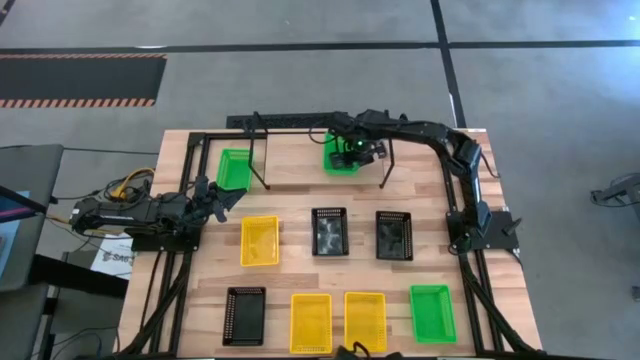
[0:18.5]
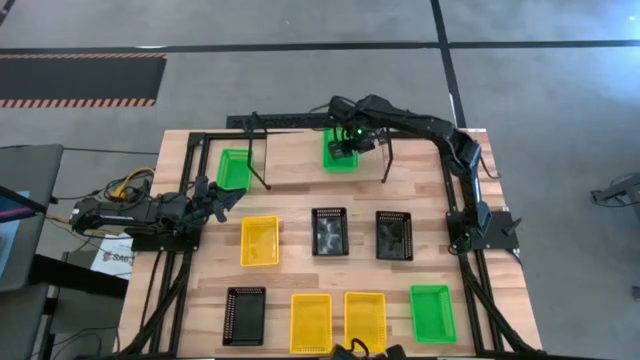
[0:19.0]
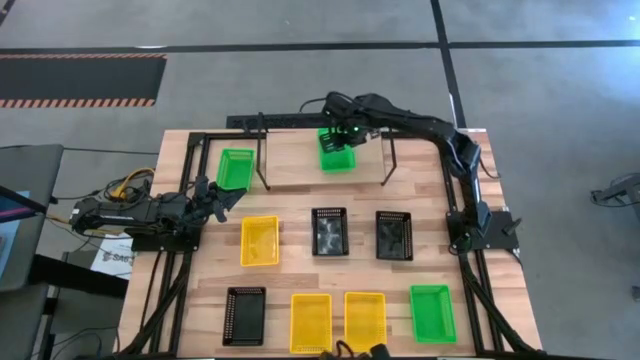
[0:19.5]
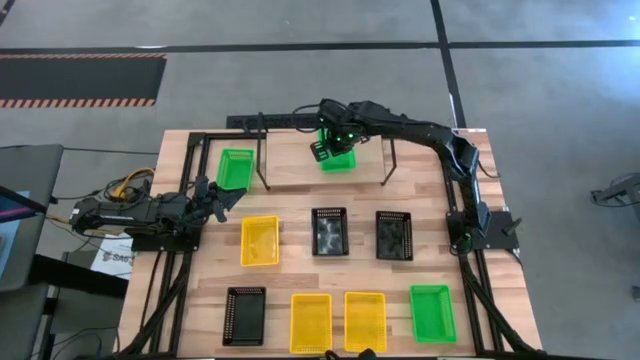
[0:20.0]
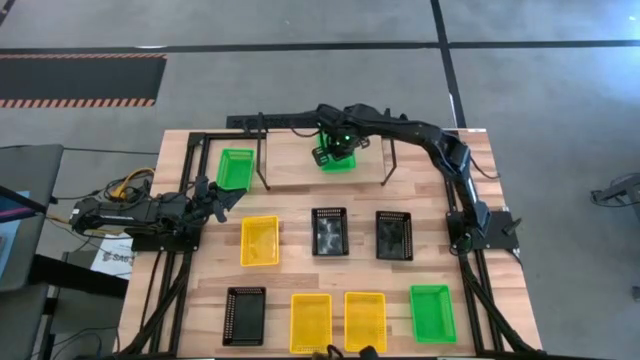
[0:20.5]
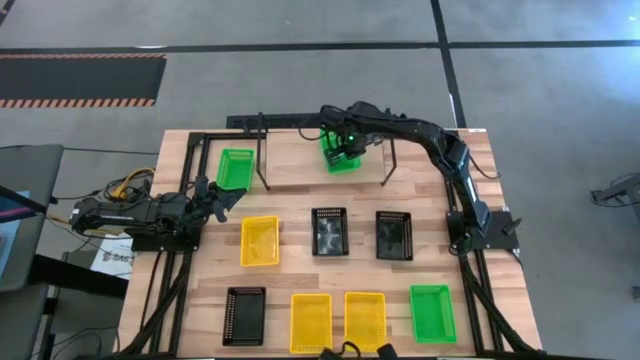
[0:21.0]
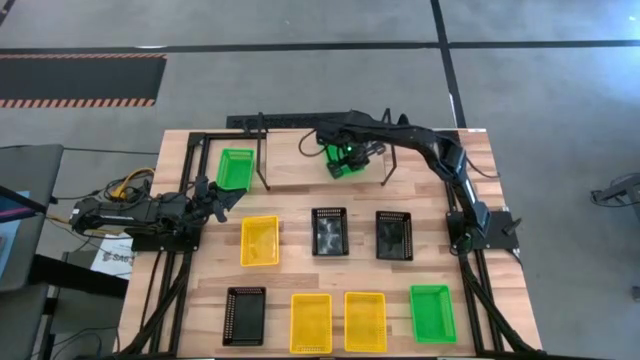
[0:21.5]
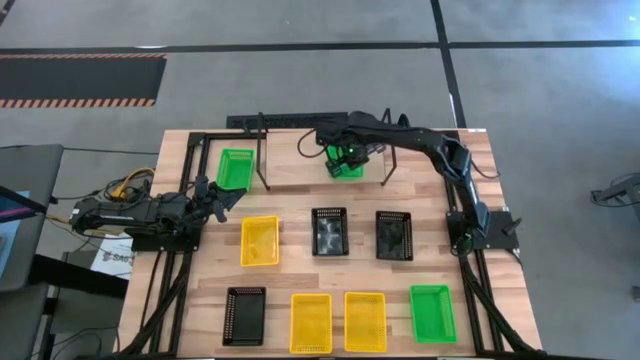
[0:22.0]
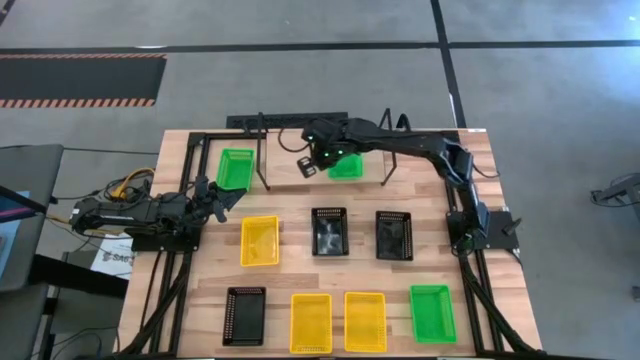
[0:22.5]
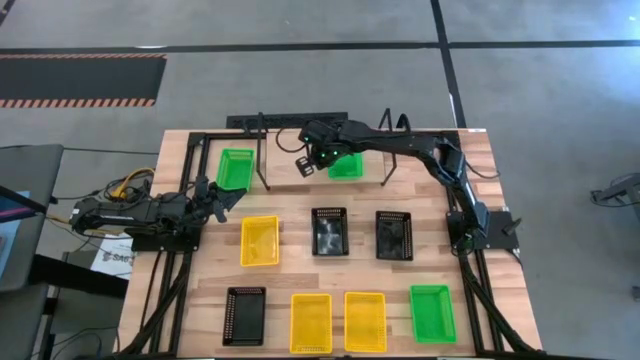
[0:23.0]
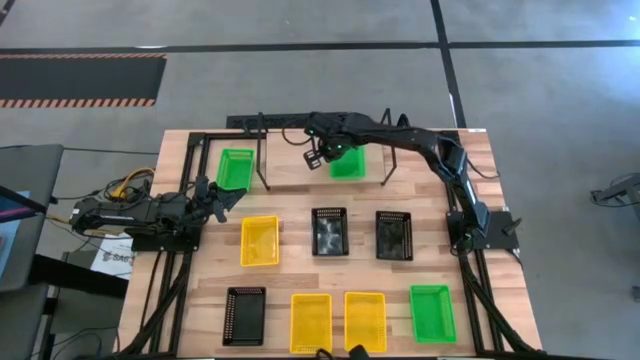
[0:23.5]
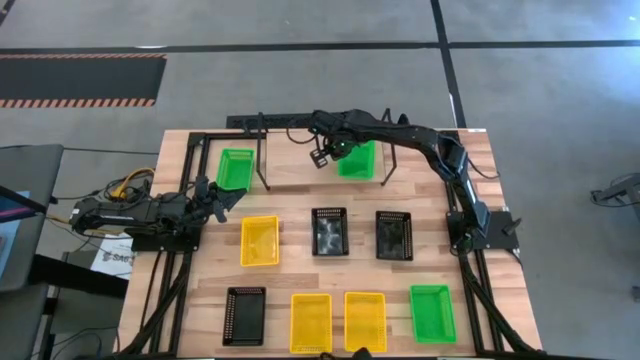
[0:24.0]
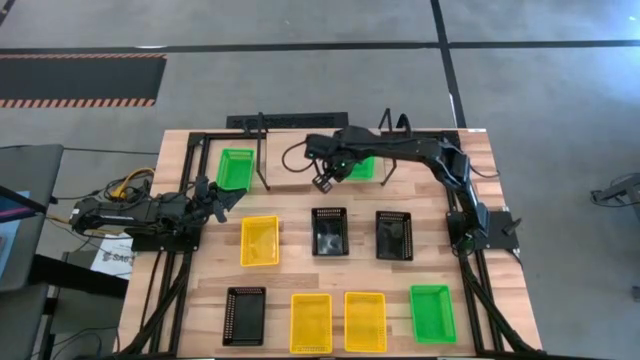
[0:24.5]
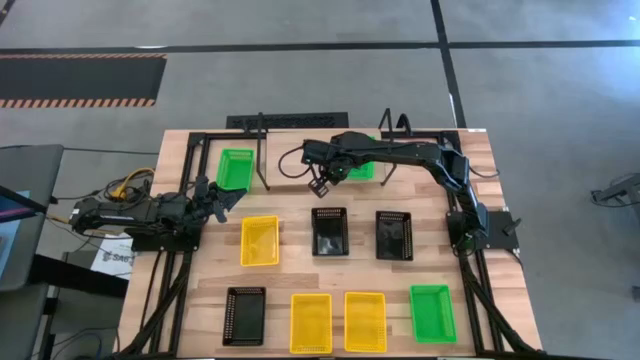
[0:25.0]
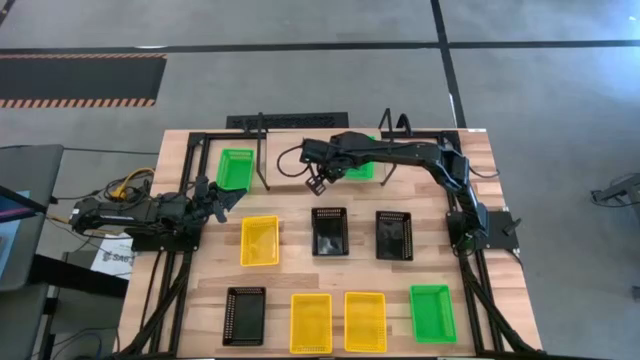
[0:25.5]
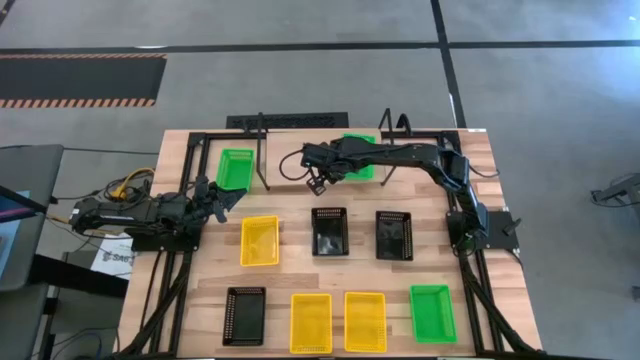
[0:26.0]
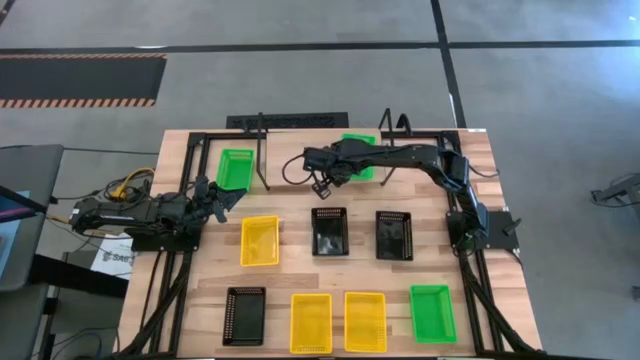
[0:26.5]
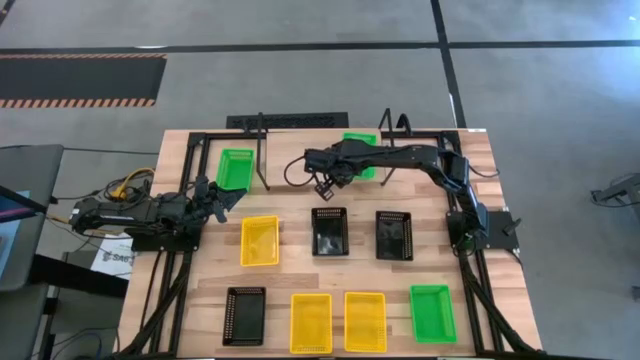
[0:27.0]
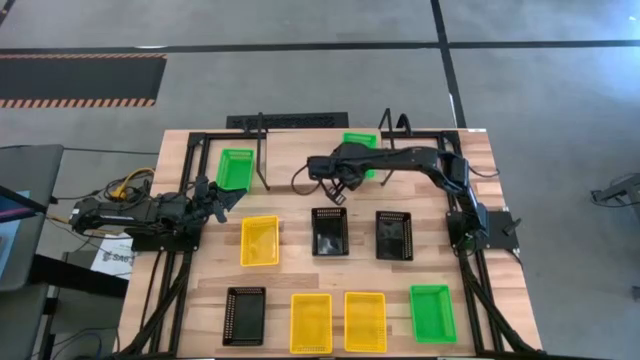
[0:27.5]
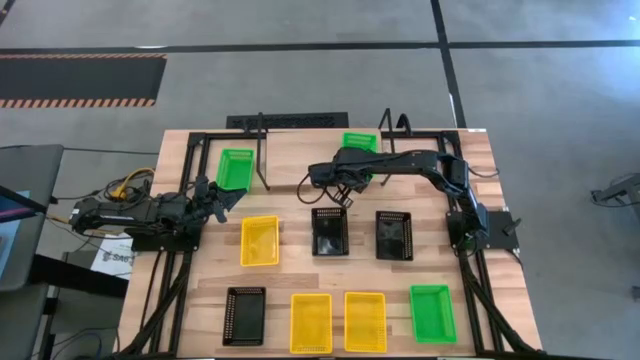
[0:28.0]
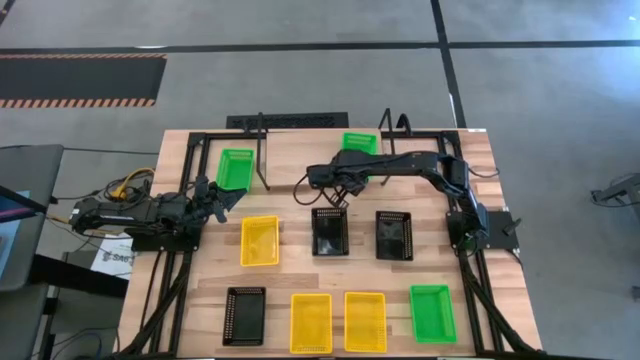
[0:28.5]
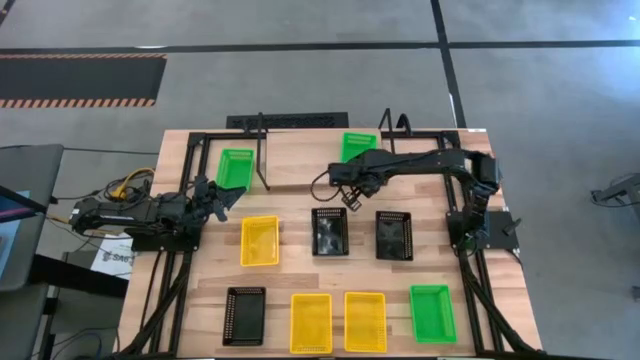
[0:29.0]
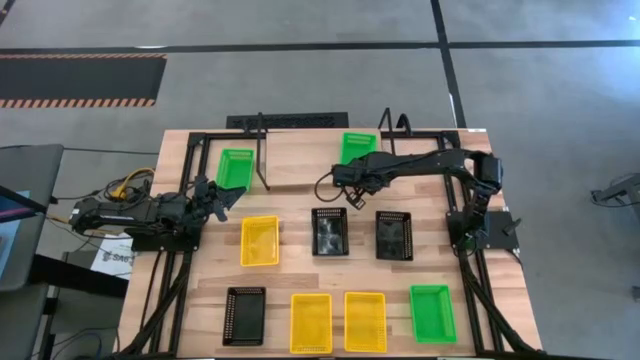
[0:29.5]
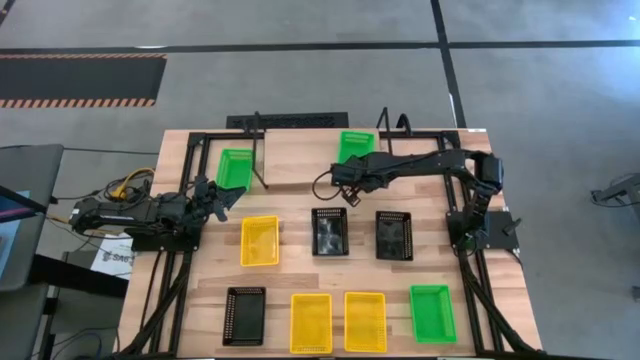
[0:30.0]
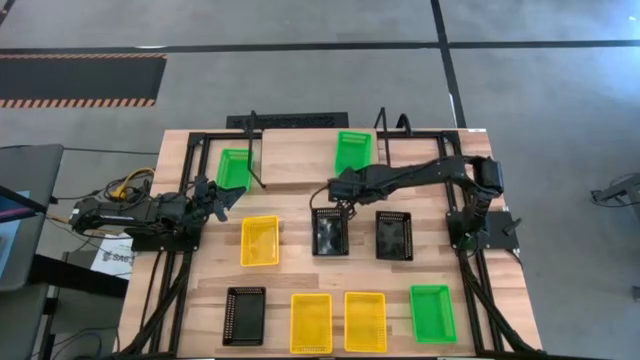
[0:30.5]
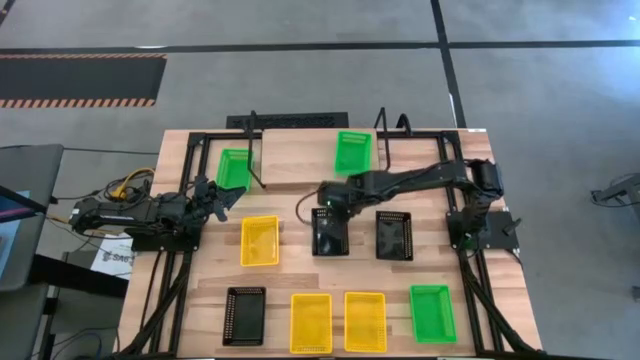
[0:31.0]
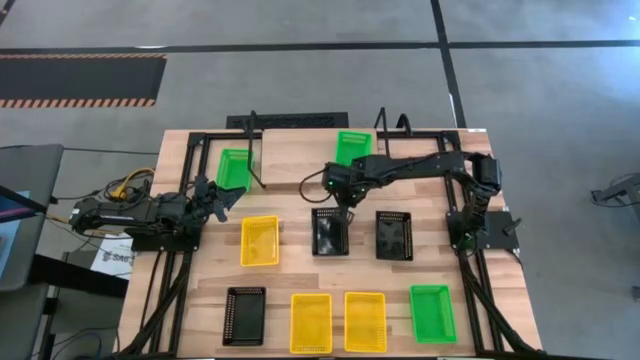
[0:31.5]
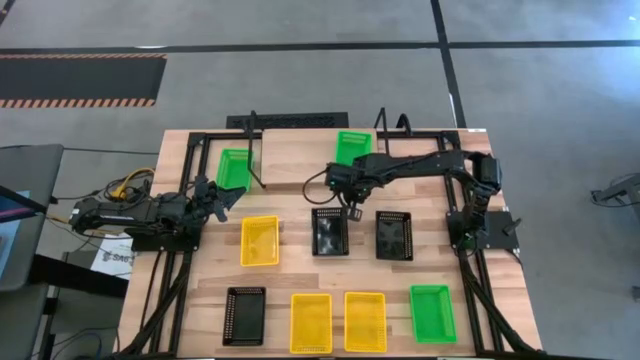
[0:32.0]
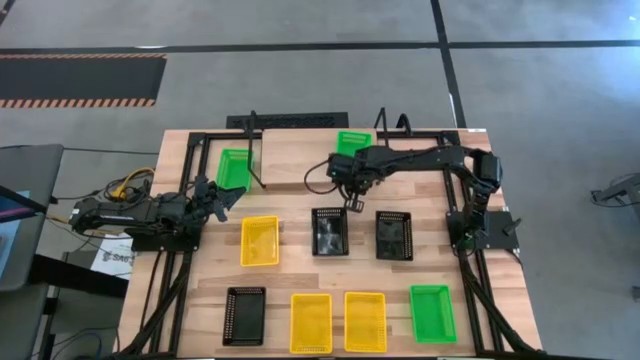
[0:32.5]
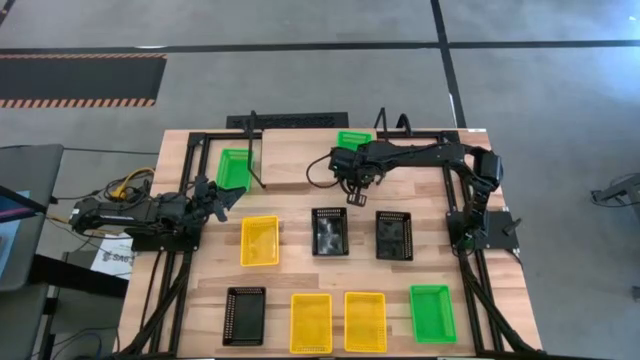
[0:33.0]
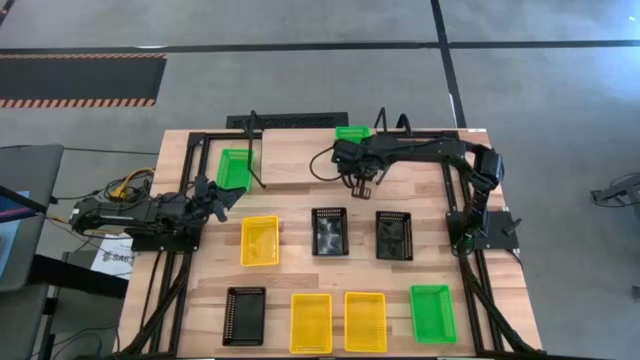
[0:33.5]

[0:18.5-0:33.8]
Task: Stack baskets on shelf by color
Put the top right green bin on the shelf

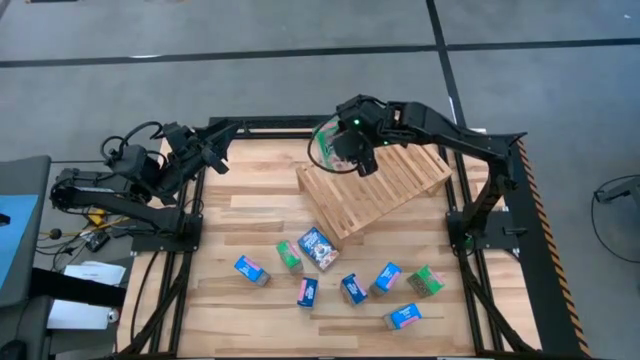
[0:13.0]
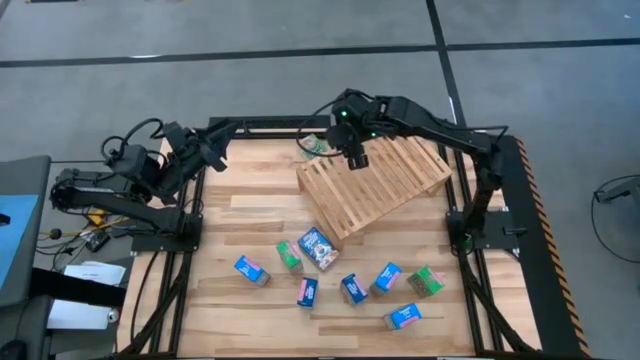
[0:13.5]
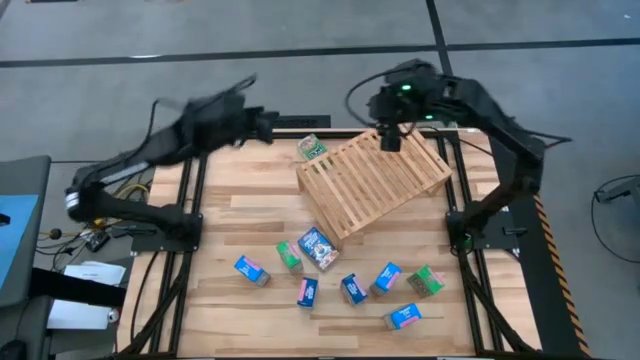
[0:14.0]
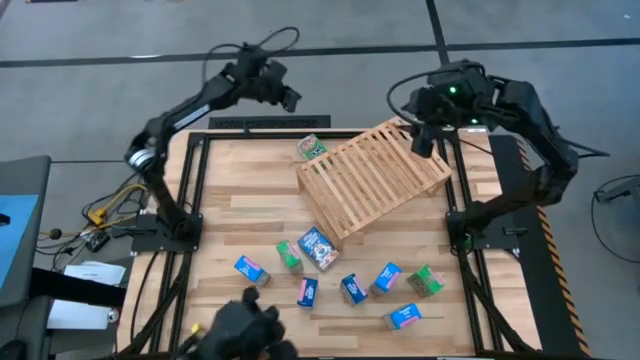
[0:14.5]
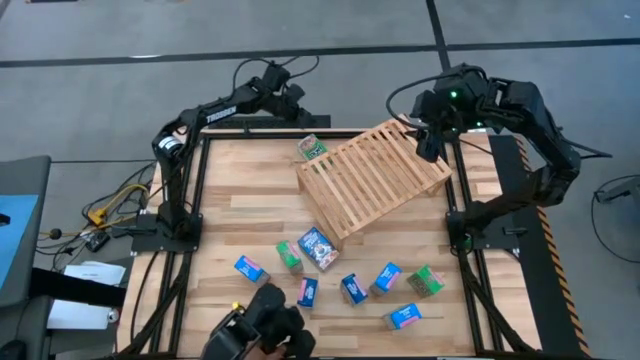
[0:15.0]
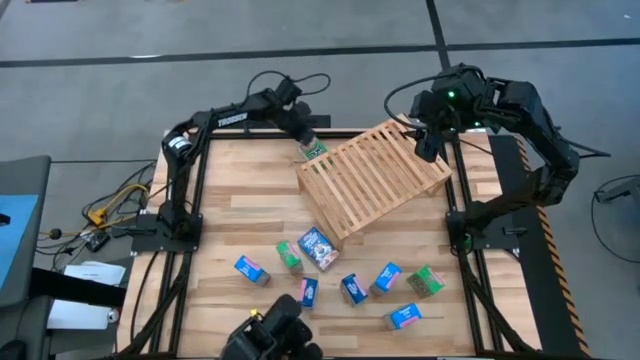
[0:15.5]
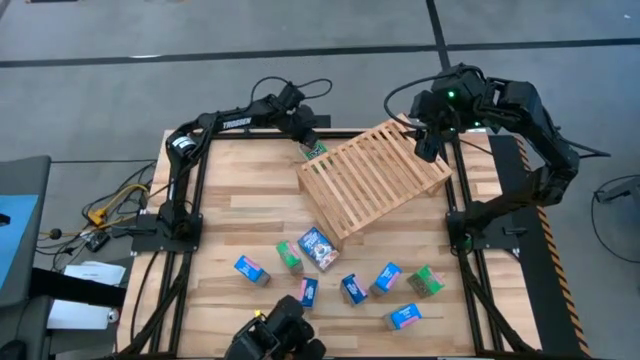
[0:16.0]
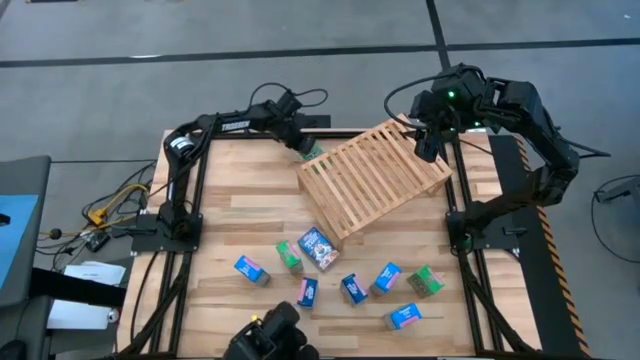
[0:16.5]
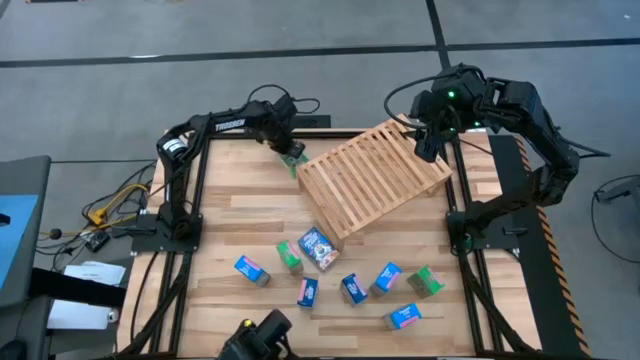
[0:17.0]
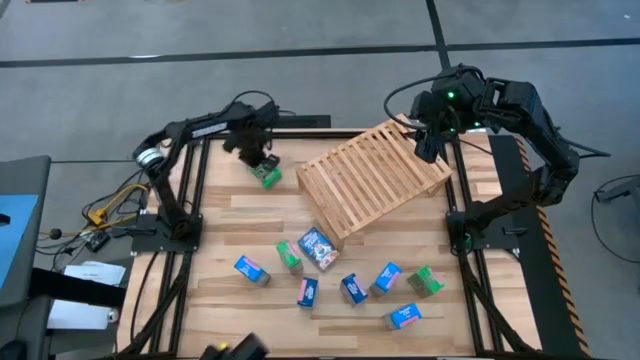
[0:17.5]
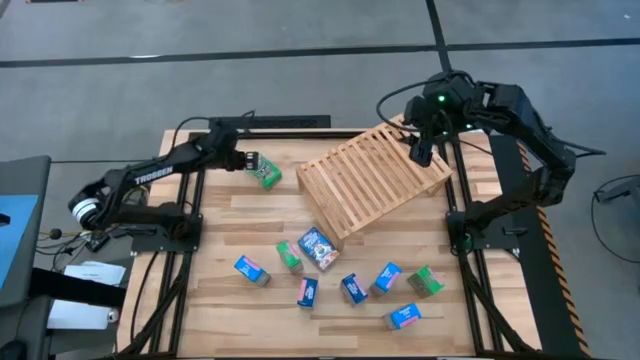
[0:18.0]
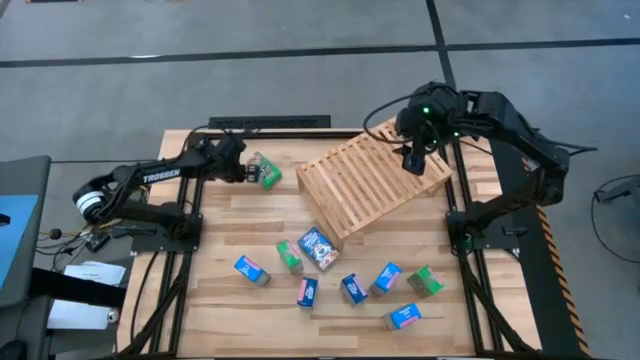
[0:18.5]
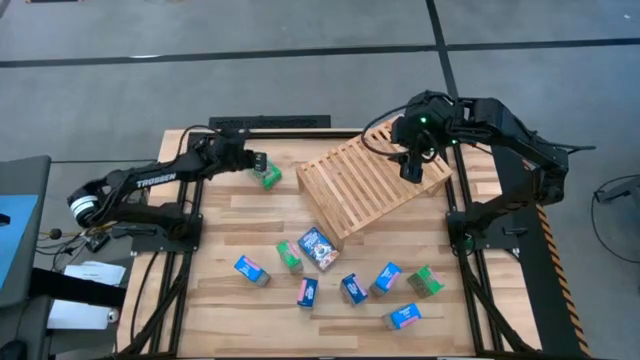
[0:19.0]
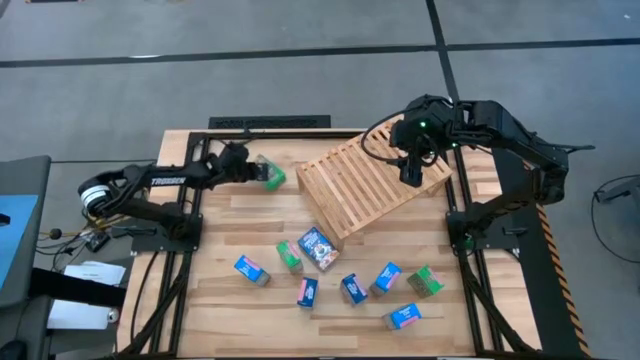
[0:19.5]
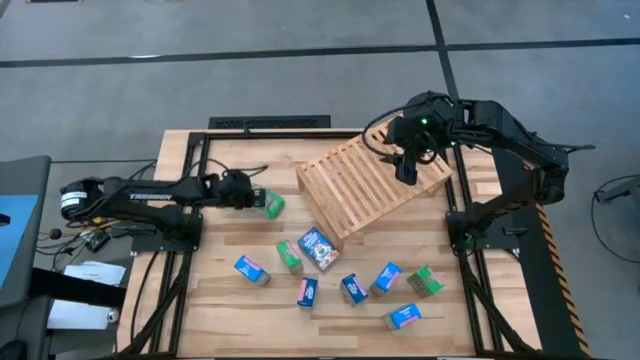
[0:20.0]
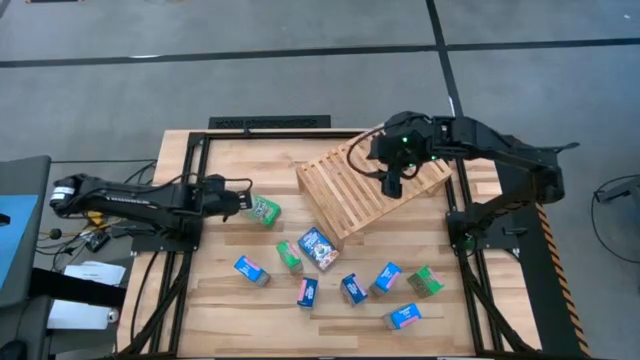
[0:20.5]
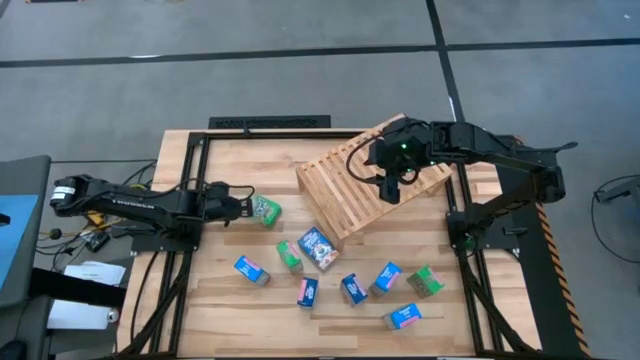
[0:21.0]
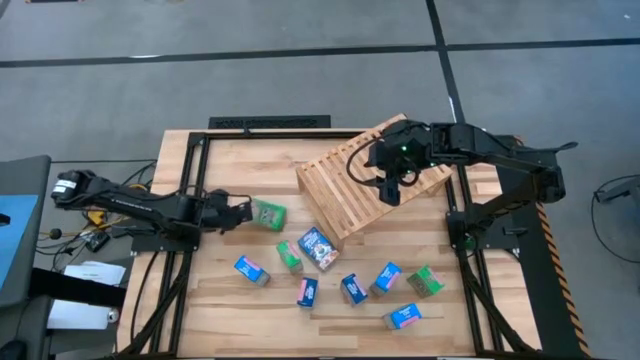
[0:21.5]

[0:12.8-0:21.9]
Task: Stack cereal on shelf
Move the top green cereal box to the left of the table
